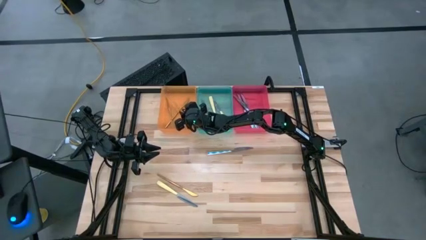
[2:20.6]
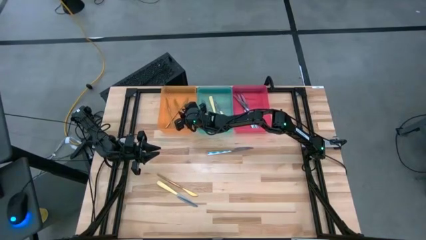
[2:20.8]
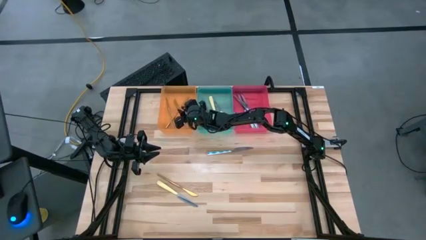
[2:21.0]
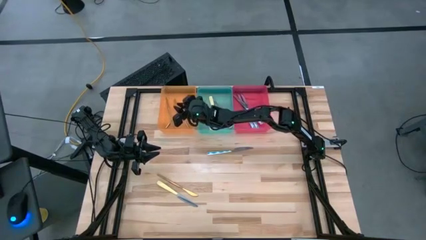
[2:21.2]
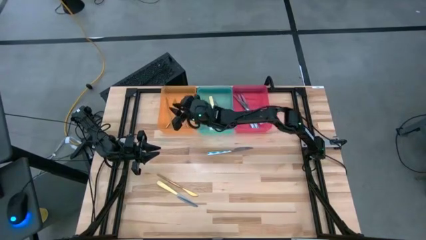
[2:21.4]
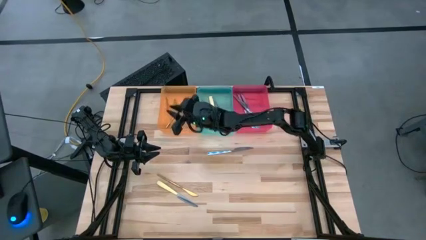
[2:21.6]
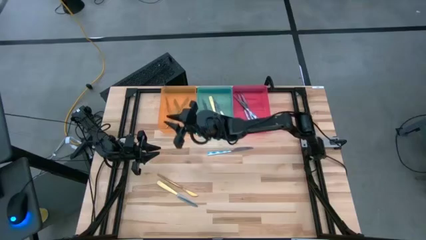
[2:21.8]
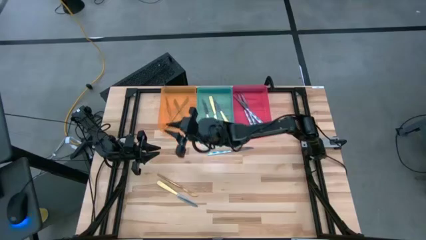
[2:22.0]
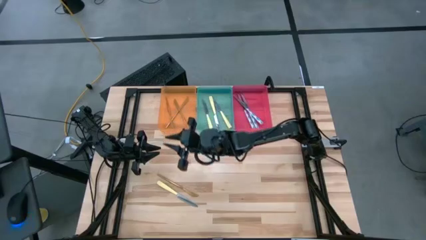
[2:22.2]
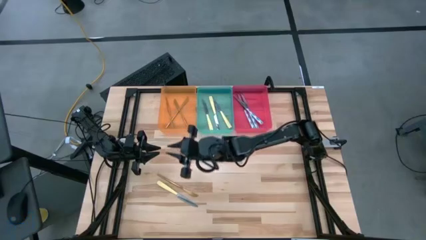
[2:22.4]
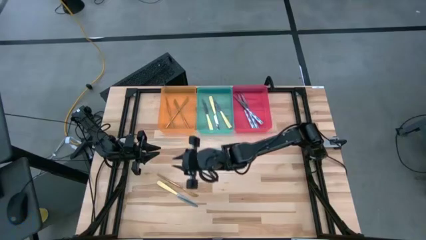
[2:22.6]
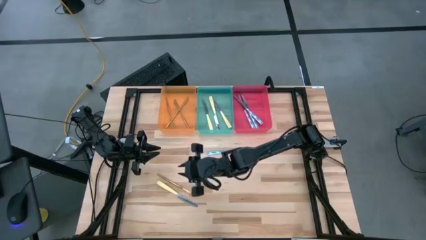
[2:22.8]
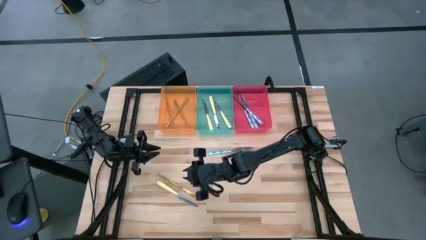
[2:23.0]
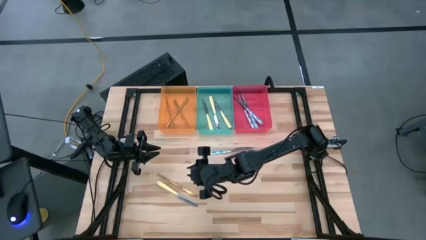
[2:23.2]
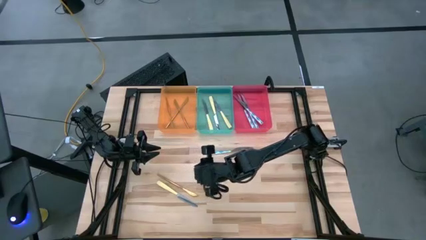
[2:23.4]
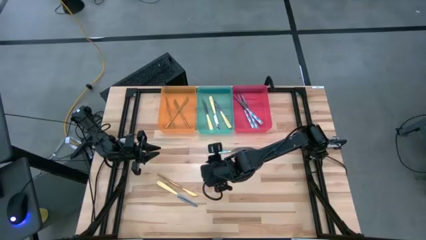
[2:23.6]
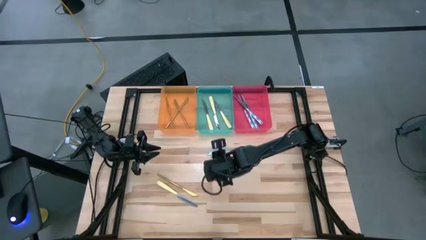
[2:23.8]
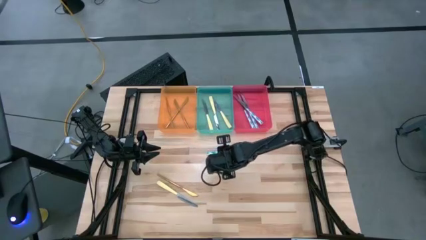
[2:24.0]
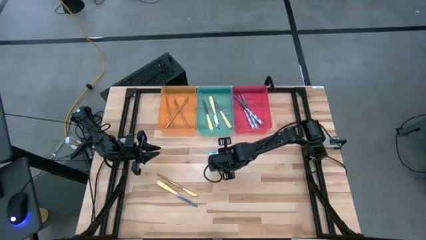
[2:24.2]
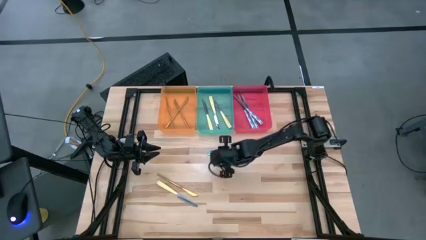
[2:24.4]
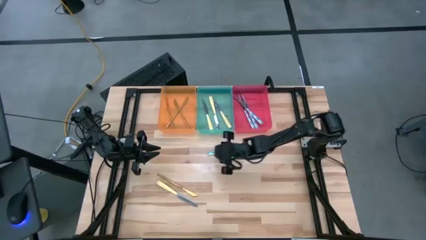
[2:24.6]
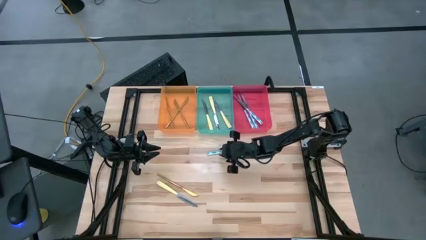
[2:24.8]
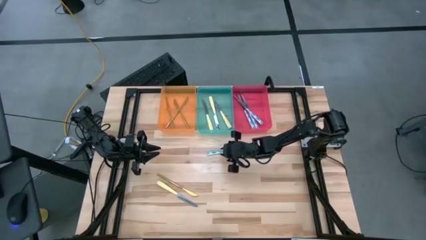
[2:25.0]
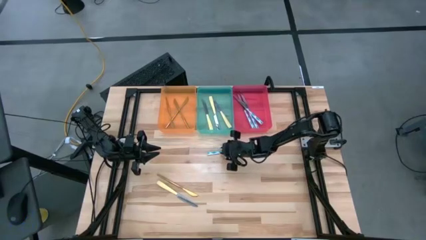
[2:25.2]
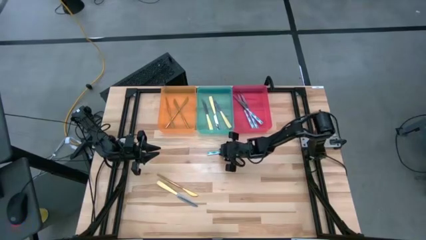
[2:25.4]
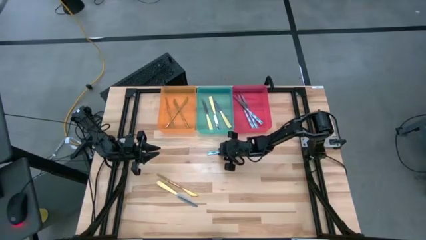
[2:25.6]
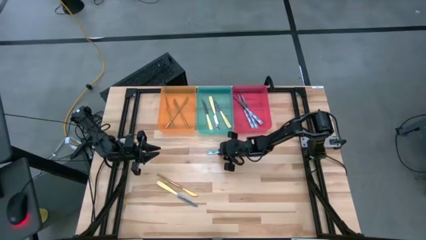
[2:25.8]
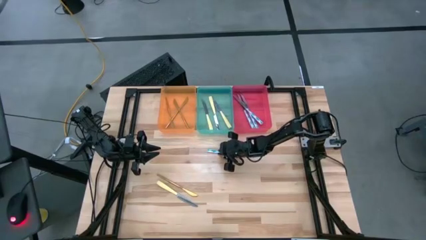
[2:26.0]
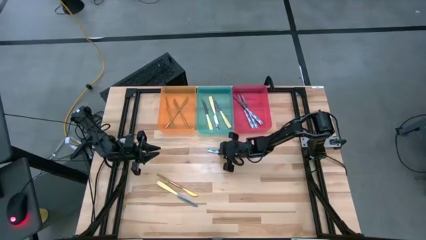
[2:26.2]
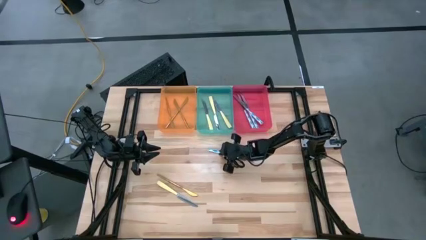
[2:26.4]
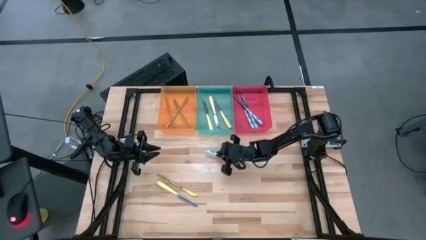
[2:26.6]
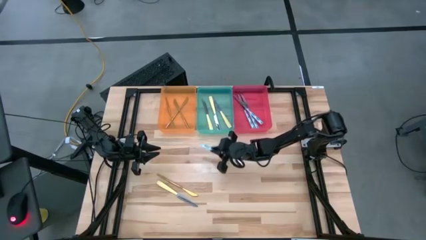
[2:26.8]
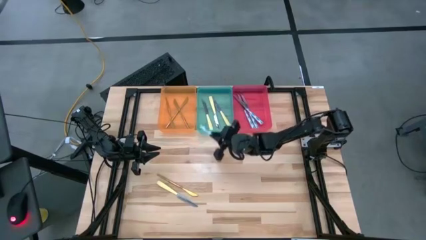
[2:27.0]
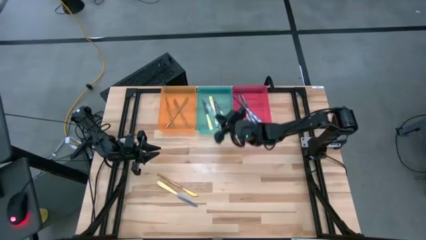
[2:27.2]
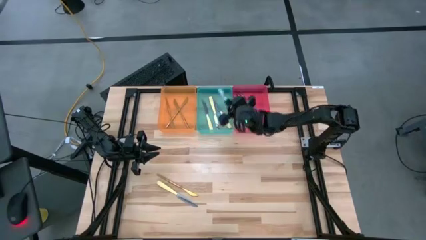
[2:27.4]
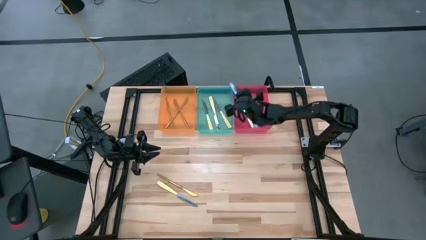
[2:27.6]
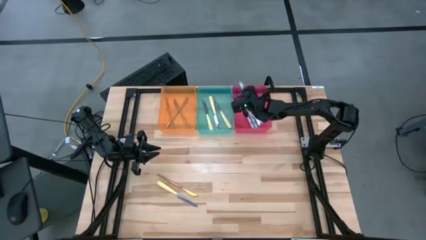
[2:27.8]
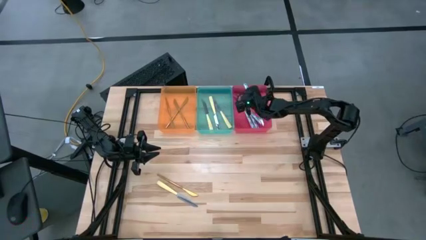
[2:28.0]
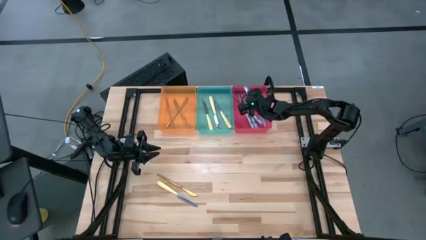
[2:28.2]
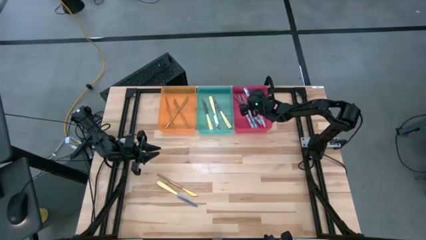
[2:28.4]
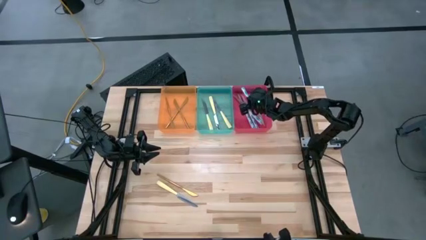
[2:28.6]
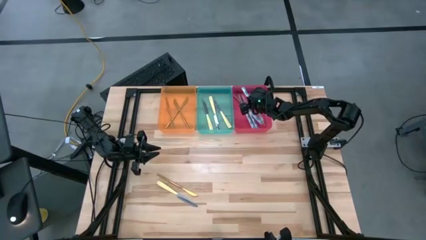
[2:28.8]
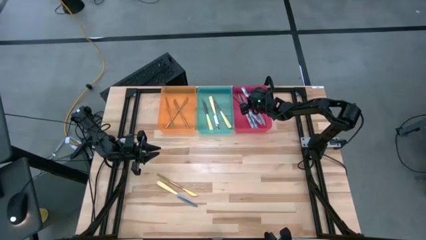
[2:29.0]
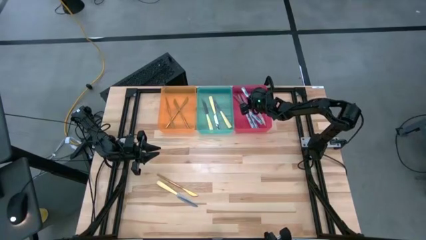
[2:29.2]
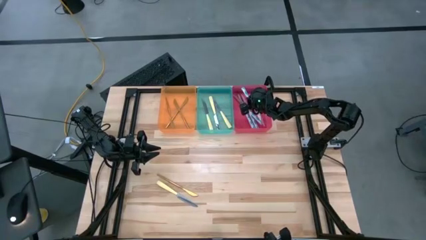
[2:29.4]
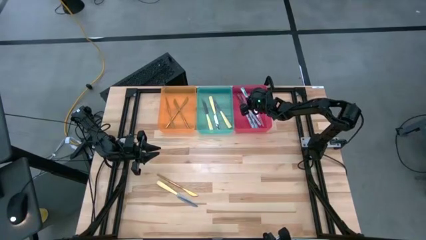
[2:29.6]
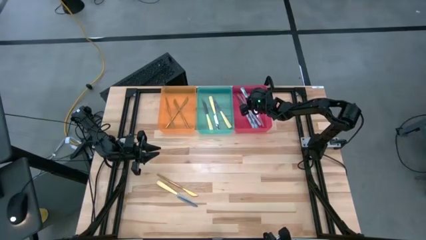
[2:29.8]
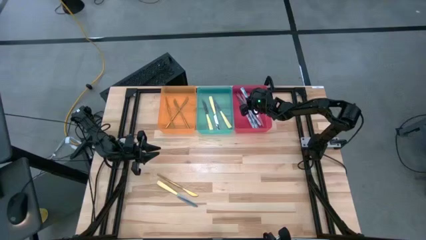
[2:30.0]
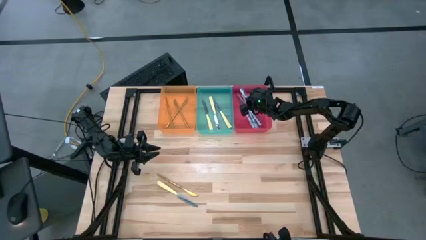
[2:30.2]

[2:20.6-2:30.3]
Task: Sort silverware by color (type)
Put the blue patterned table knife into the red bin

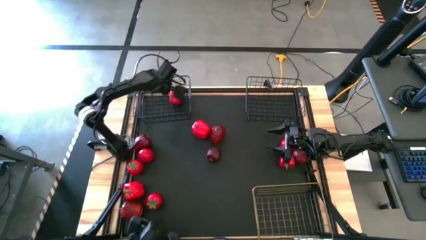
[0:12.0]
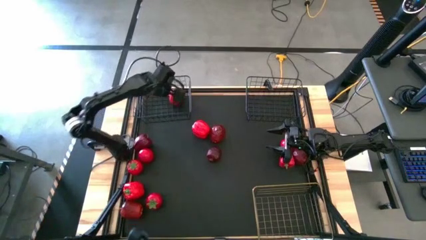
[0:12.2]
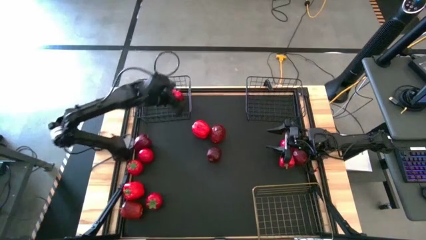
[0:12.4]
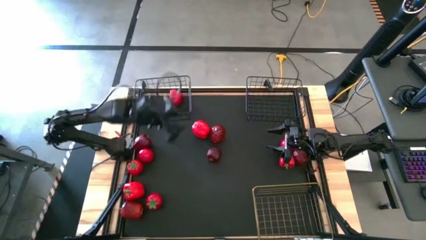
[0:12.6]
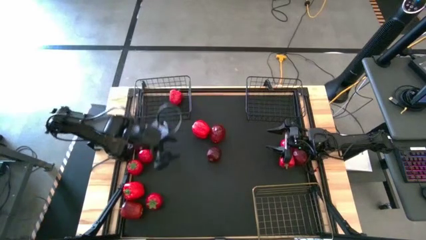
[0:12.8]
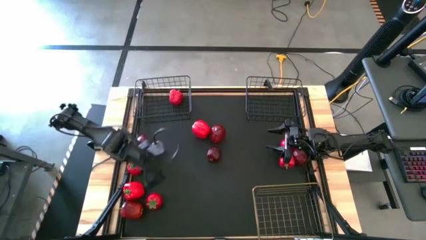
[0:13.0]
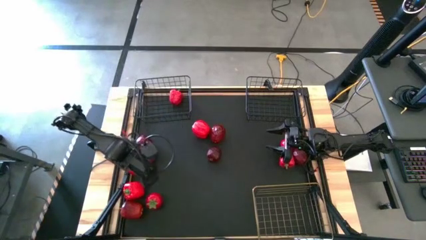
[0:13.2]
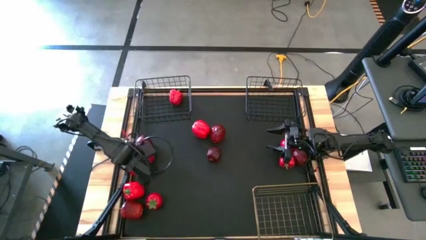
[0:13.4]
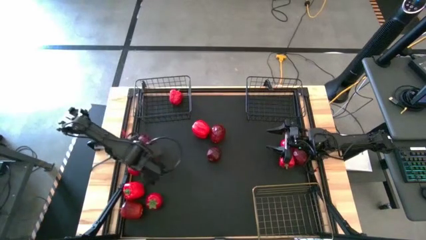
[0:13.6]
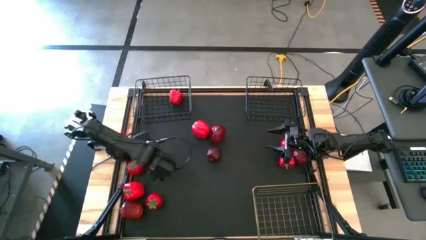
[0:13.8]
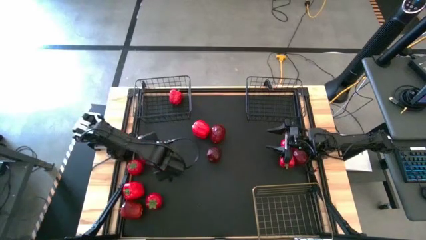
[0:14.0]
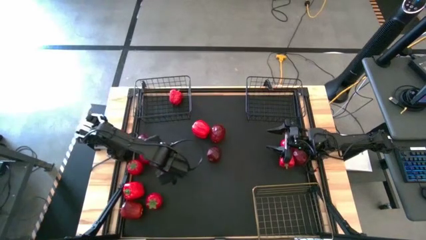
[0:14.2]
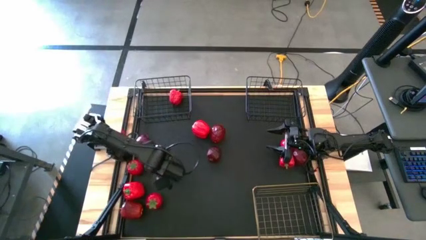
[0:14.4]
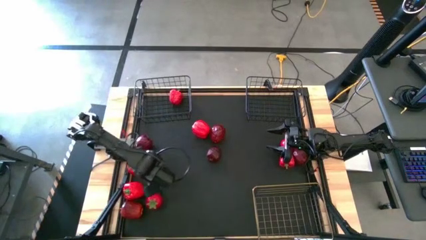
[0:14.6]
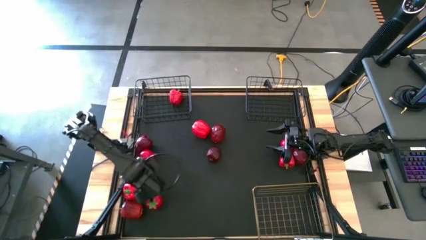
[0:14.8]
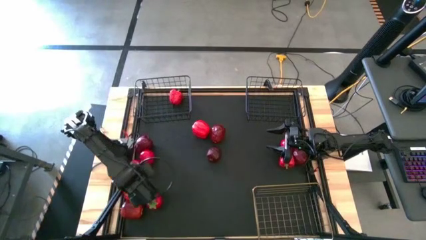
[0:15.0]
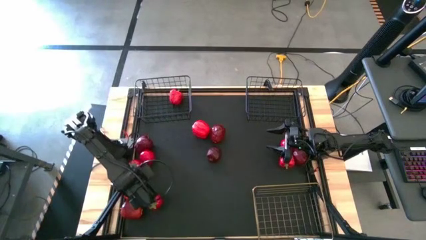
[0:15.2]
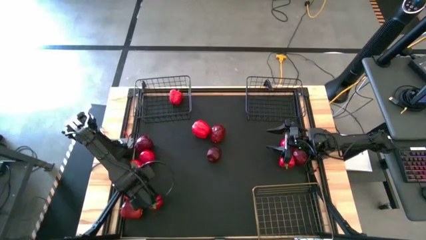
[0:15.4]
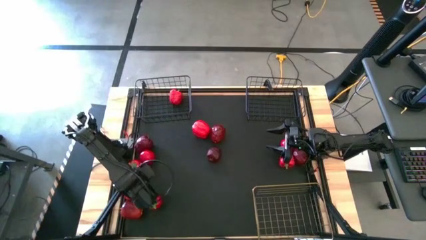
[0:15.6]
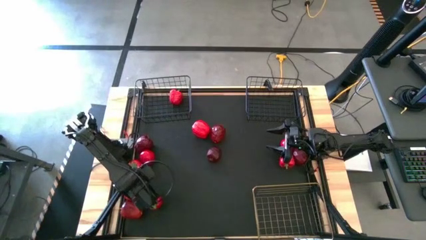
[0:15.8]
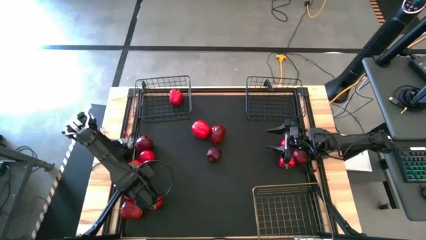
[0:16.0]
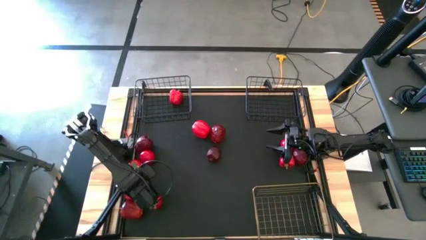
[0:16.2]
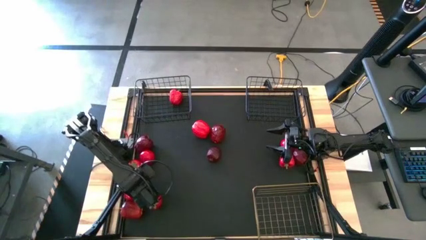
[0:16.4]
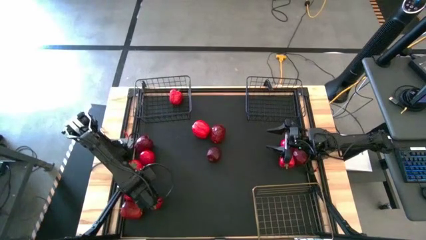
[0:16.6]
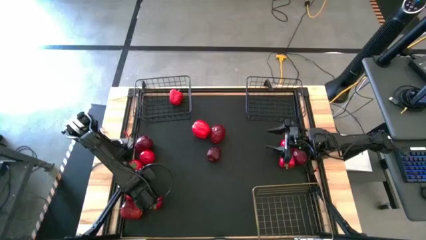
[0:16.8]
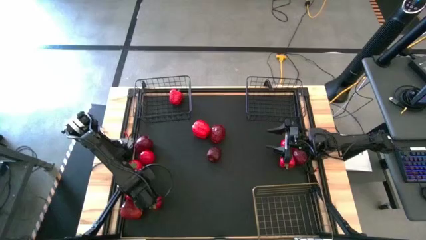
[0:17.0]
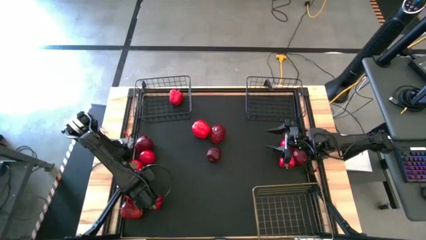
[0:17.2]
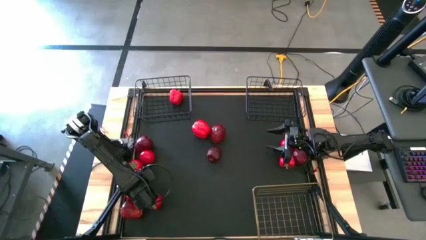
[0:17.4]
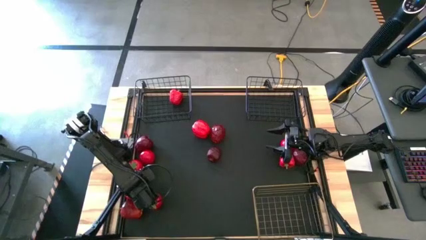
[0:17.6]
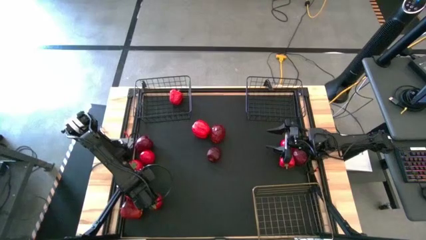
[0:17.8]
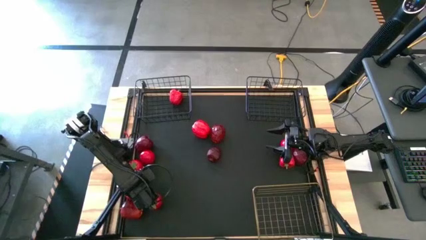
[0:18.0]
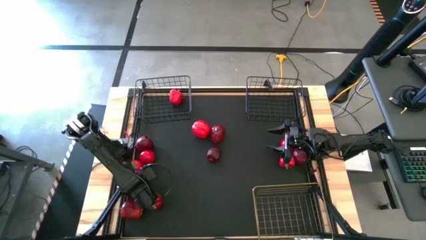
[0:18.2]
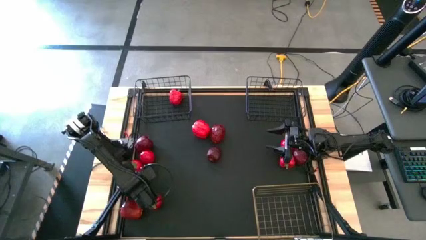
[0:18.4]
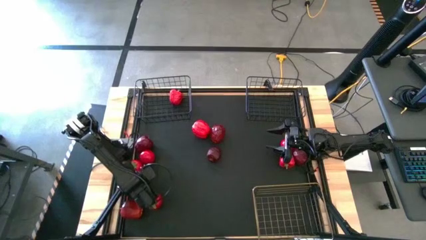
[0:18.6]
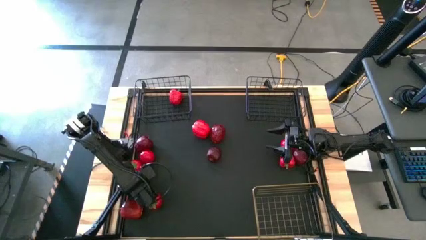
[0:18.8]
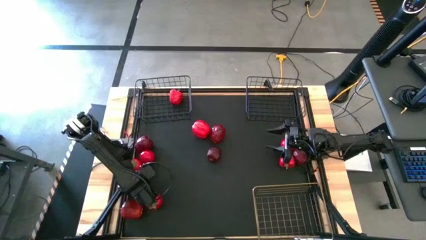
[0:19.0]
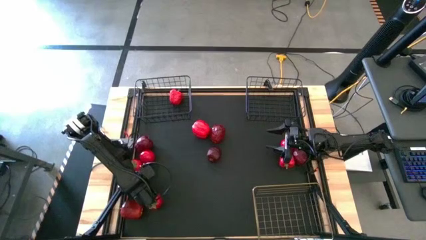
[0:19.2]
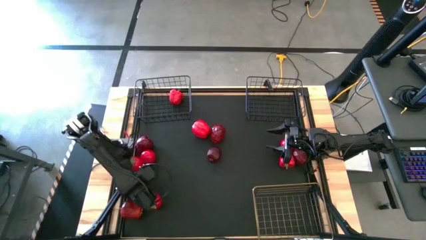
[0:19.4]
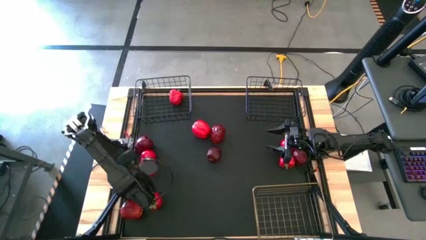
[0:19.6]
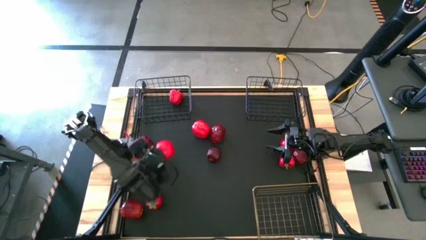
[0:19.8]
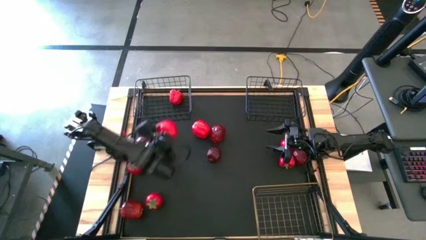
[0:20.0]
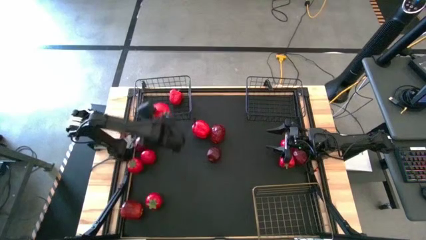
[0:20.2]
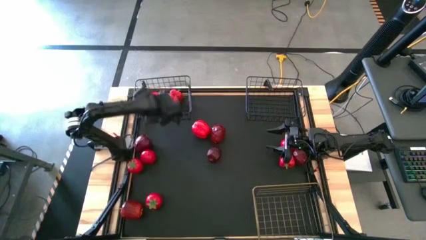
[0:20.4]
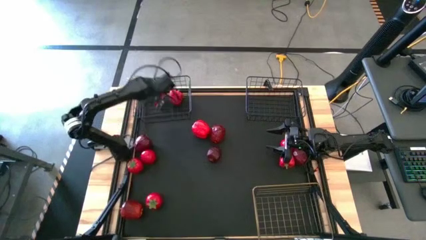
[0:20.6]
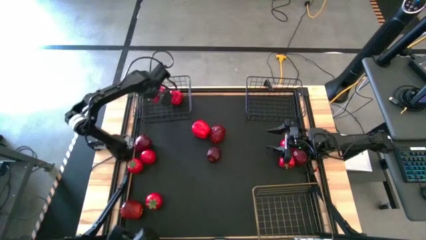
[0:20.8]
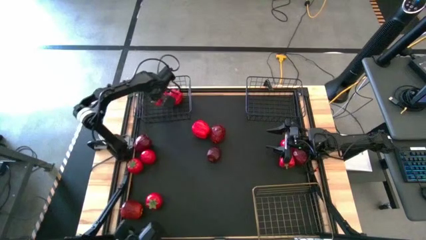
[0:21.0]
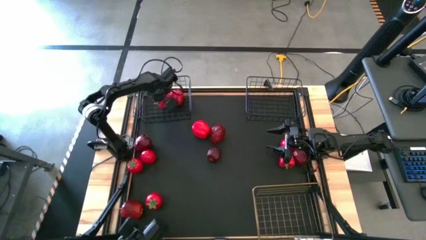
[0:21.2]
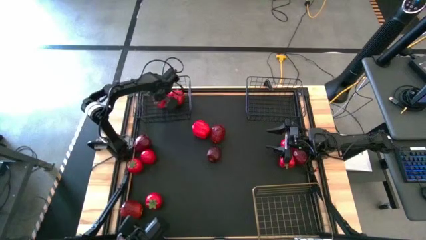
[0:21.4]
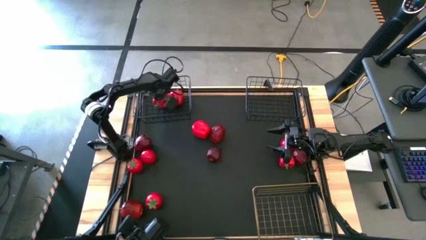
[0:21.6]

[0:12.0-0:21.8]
Task: Sort produce into baskets
Put the bell pepper into the left black wire basket
